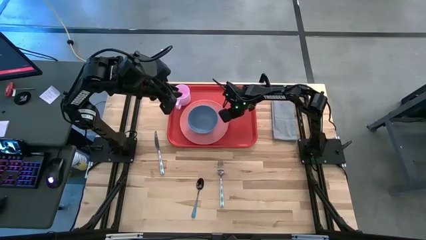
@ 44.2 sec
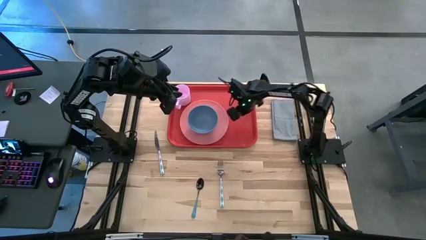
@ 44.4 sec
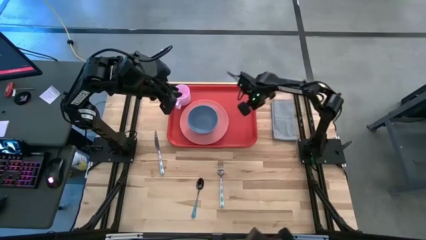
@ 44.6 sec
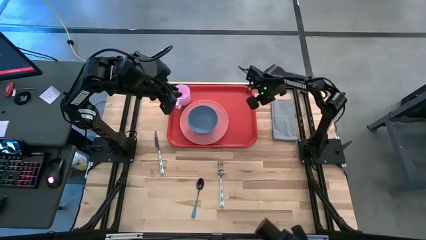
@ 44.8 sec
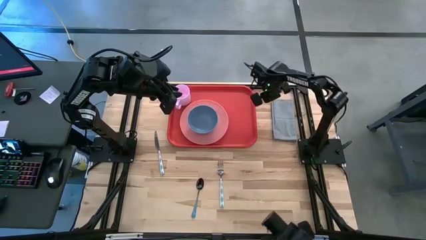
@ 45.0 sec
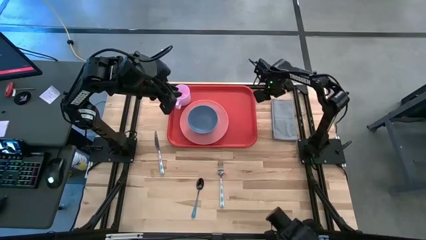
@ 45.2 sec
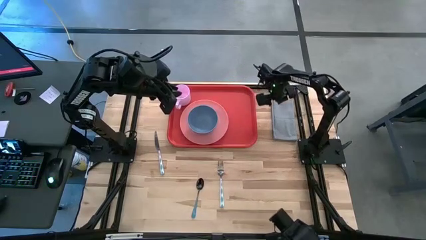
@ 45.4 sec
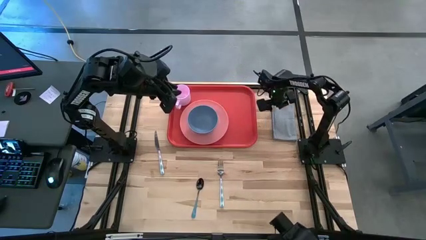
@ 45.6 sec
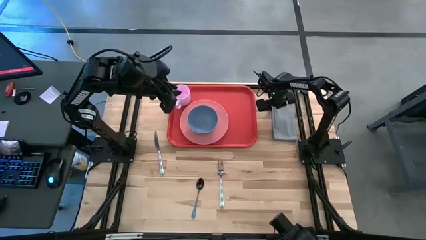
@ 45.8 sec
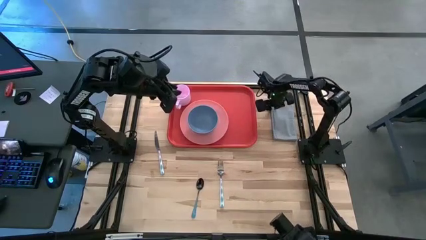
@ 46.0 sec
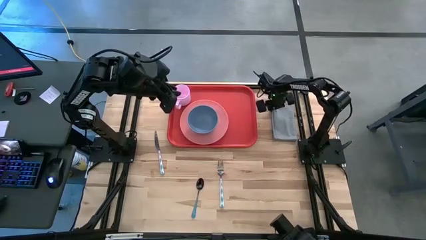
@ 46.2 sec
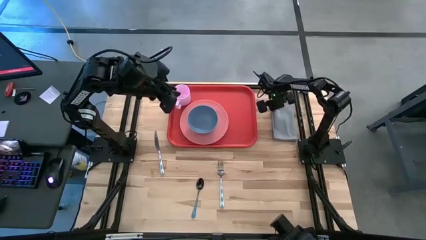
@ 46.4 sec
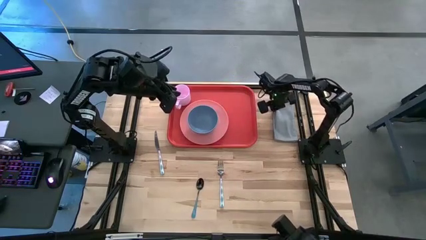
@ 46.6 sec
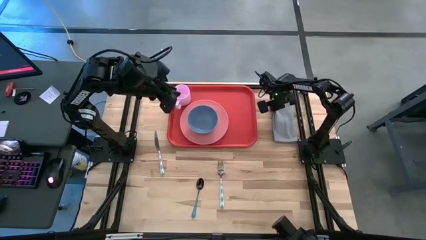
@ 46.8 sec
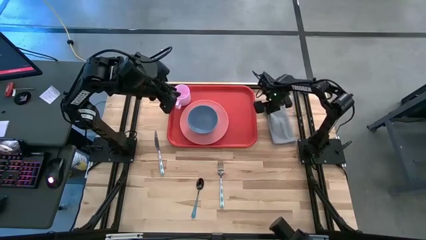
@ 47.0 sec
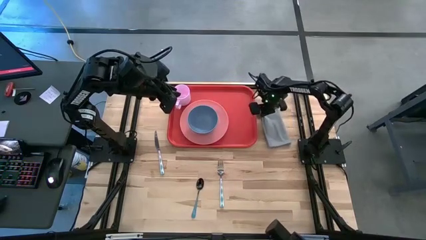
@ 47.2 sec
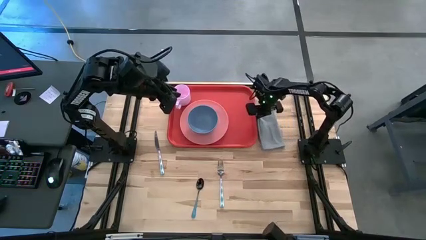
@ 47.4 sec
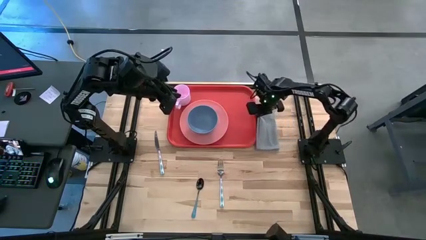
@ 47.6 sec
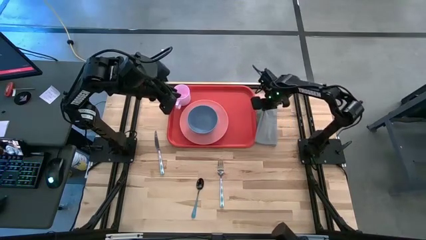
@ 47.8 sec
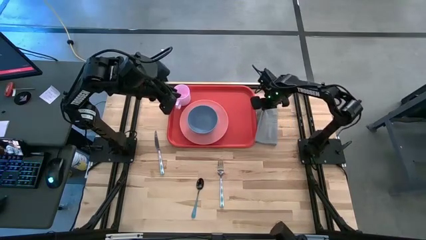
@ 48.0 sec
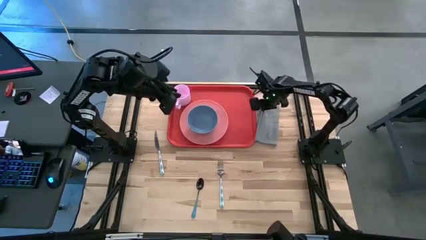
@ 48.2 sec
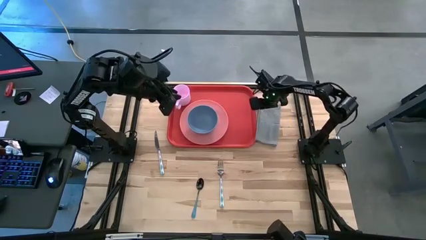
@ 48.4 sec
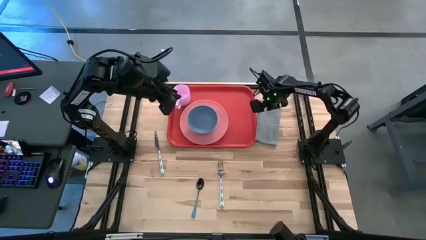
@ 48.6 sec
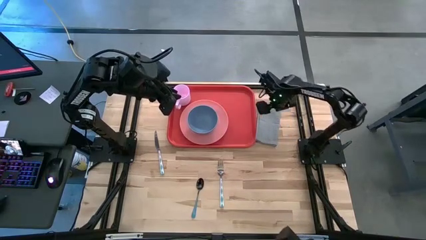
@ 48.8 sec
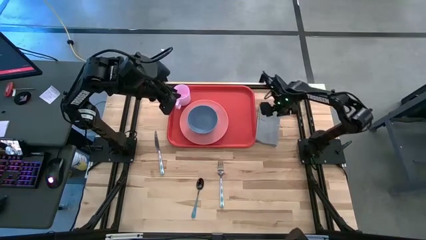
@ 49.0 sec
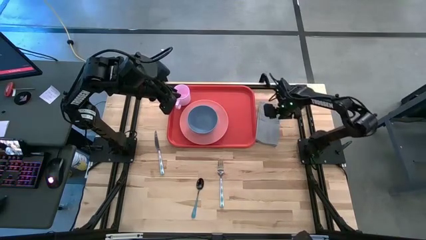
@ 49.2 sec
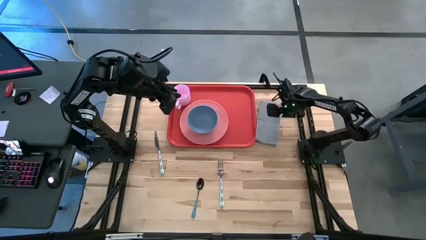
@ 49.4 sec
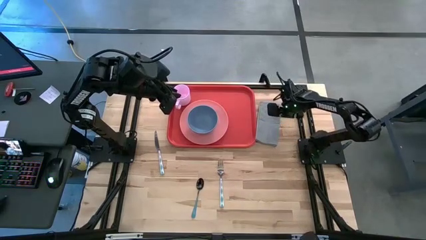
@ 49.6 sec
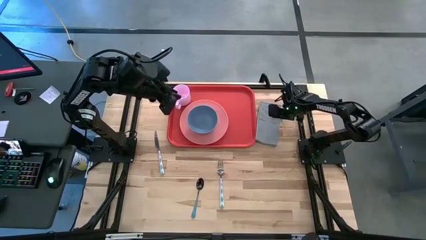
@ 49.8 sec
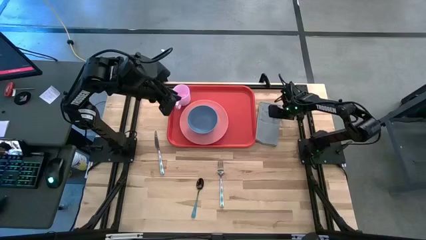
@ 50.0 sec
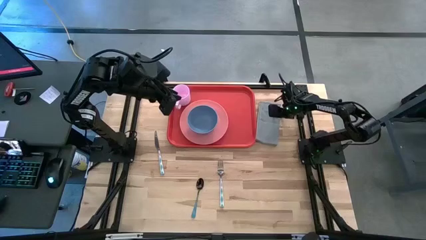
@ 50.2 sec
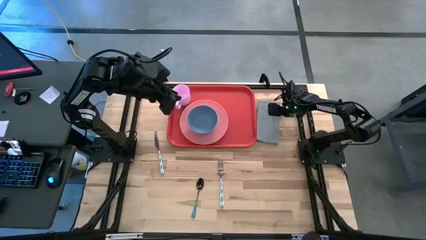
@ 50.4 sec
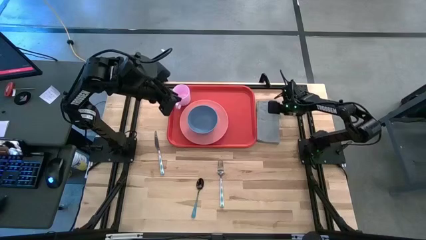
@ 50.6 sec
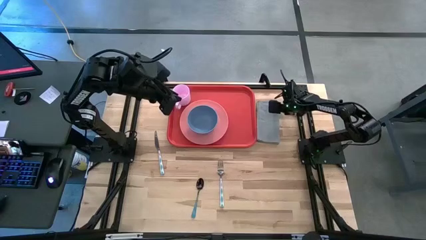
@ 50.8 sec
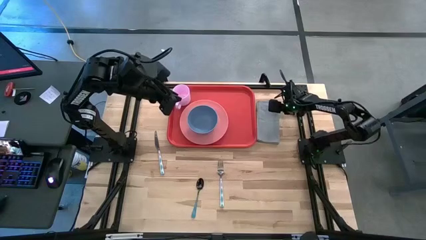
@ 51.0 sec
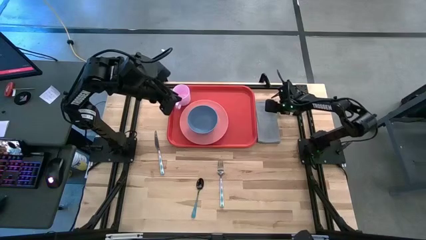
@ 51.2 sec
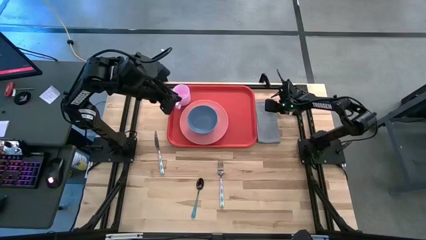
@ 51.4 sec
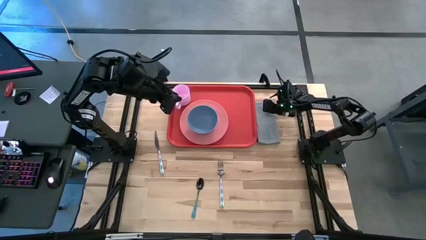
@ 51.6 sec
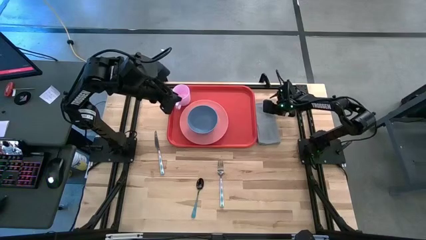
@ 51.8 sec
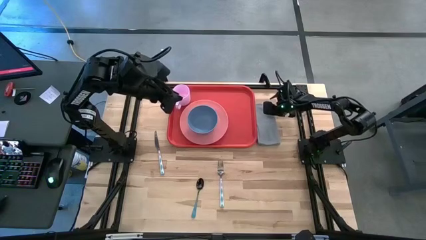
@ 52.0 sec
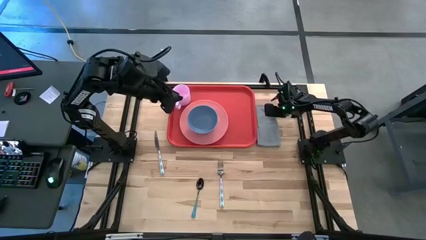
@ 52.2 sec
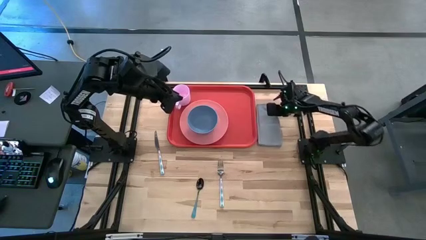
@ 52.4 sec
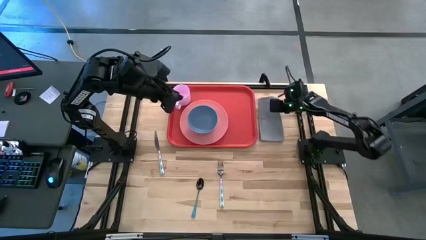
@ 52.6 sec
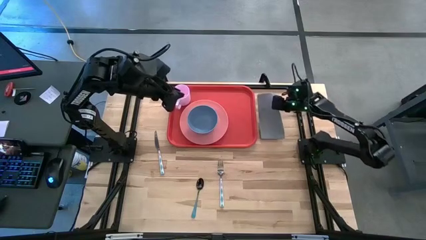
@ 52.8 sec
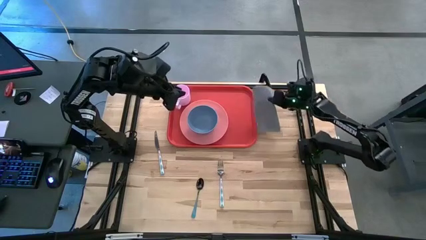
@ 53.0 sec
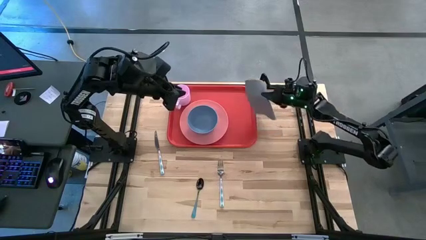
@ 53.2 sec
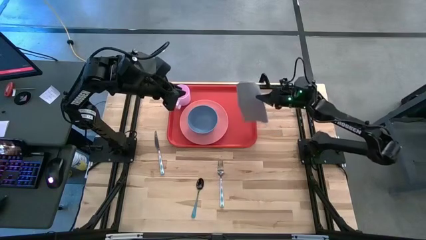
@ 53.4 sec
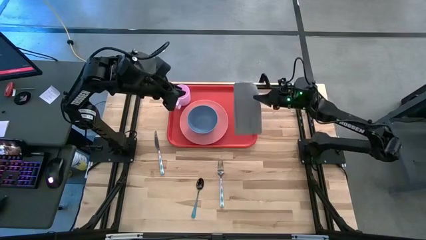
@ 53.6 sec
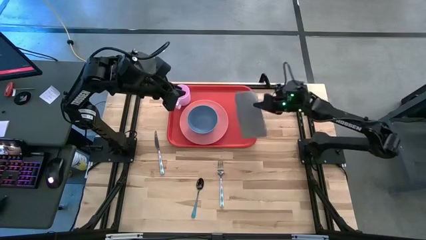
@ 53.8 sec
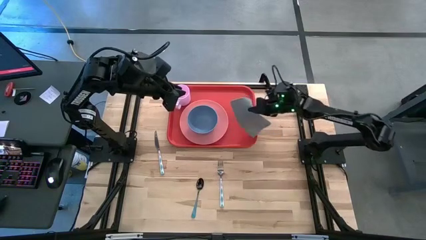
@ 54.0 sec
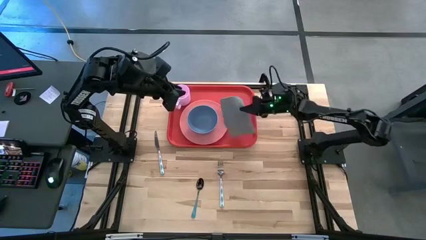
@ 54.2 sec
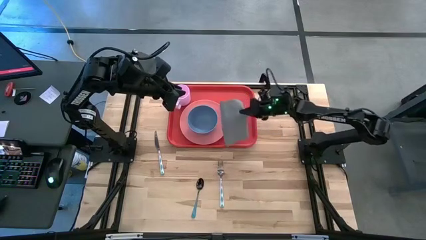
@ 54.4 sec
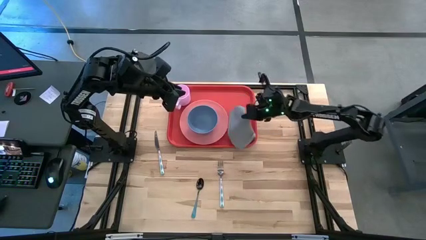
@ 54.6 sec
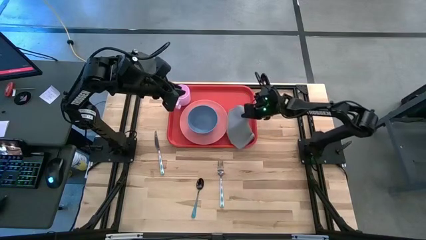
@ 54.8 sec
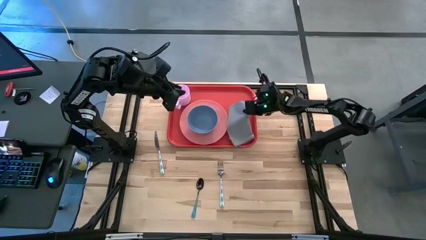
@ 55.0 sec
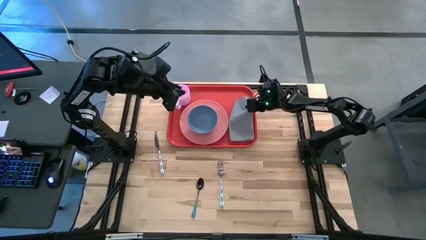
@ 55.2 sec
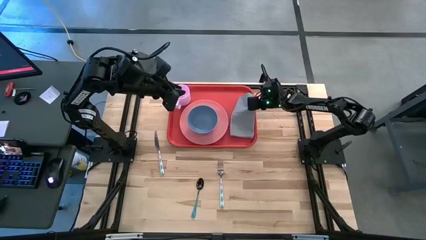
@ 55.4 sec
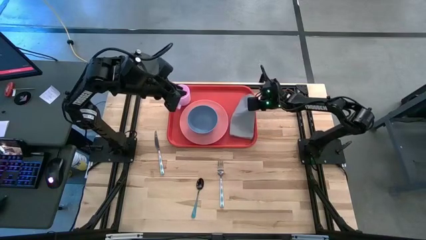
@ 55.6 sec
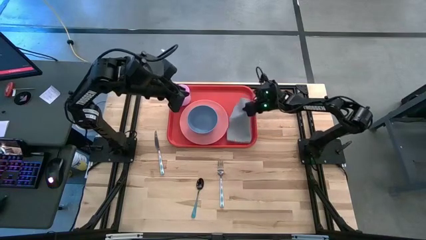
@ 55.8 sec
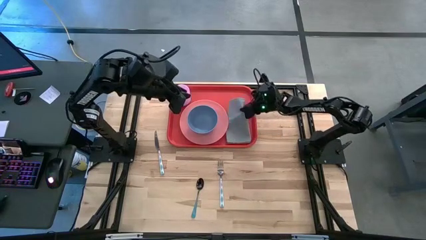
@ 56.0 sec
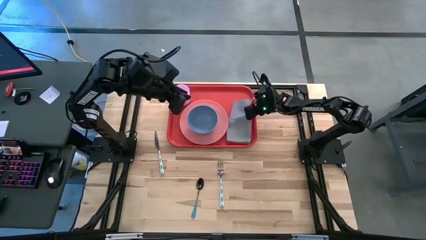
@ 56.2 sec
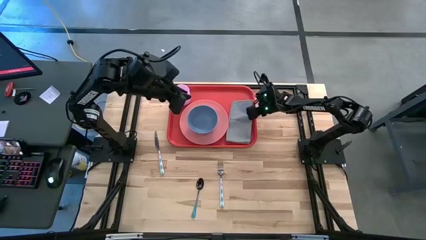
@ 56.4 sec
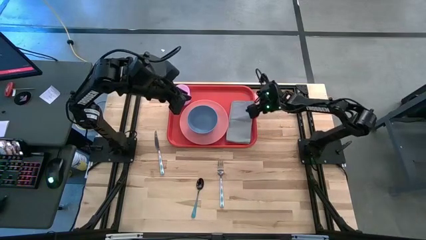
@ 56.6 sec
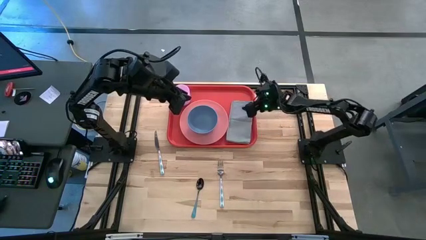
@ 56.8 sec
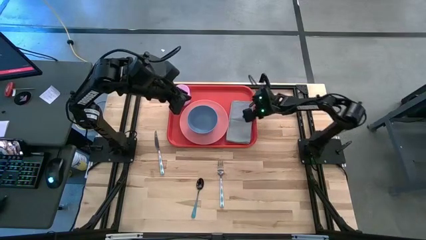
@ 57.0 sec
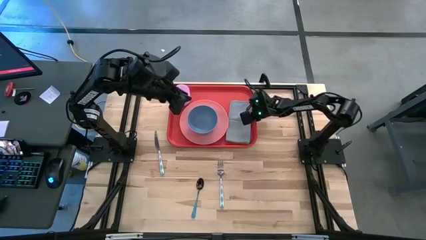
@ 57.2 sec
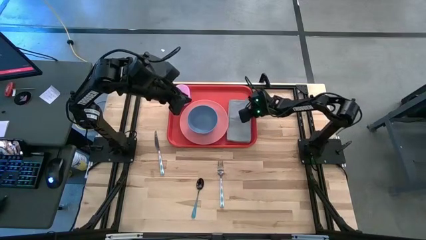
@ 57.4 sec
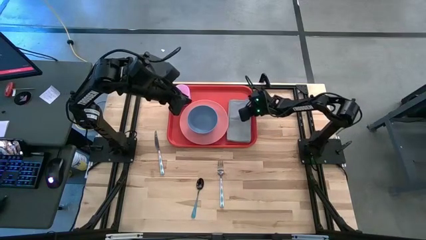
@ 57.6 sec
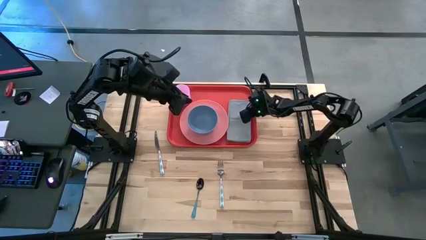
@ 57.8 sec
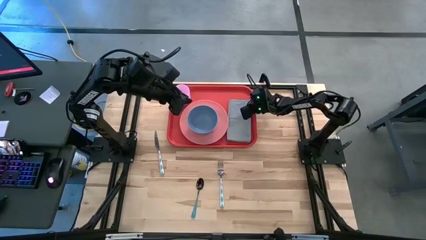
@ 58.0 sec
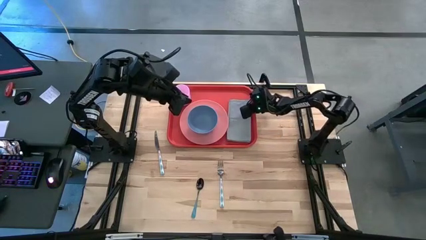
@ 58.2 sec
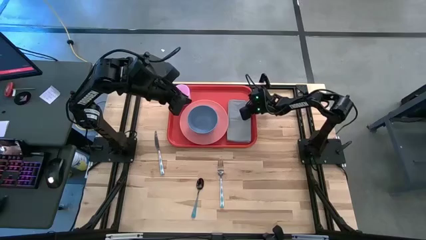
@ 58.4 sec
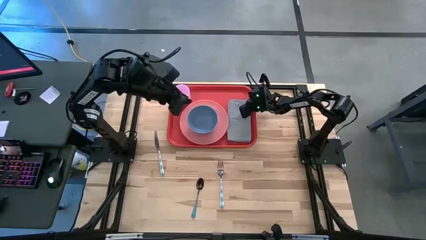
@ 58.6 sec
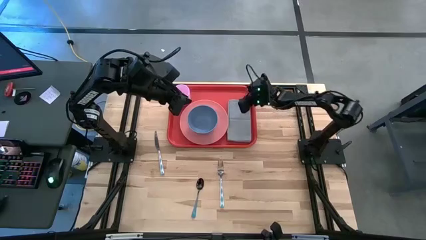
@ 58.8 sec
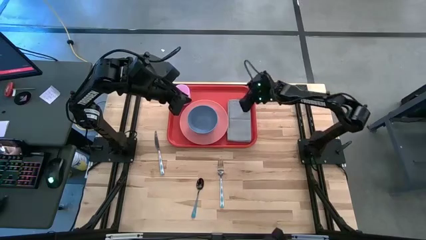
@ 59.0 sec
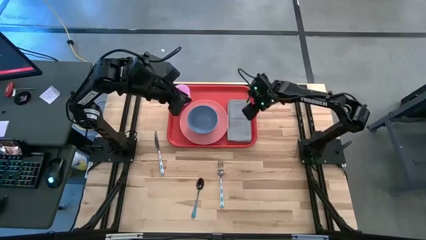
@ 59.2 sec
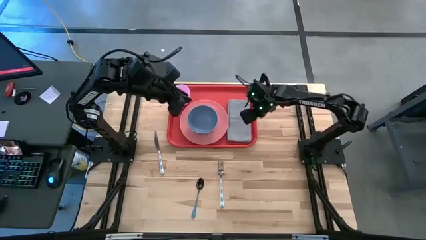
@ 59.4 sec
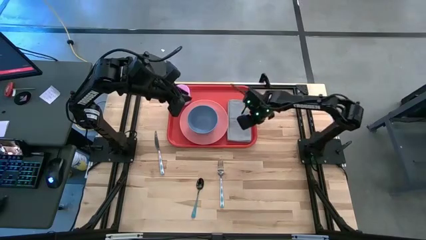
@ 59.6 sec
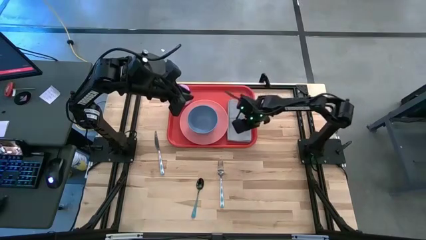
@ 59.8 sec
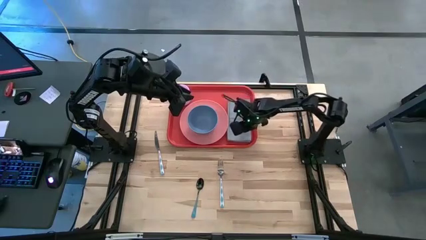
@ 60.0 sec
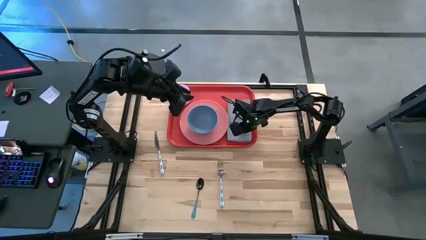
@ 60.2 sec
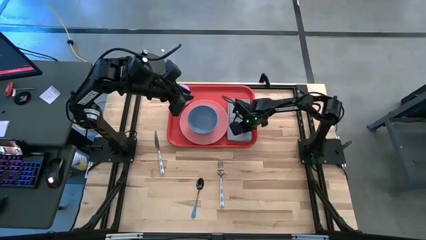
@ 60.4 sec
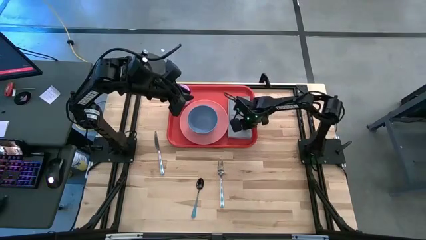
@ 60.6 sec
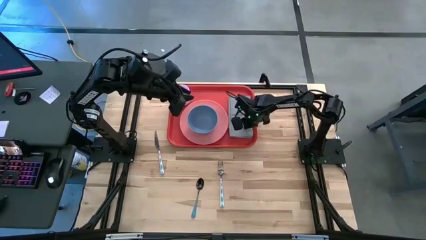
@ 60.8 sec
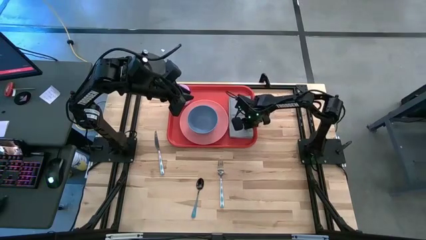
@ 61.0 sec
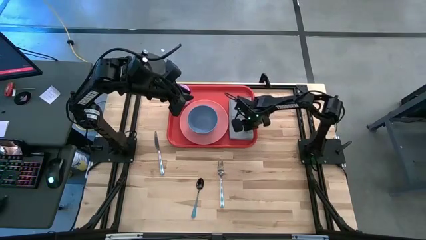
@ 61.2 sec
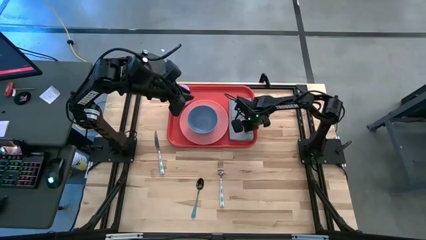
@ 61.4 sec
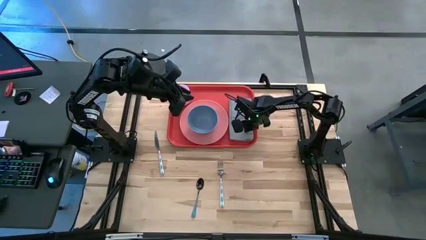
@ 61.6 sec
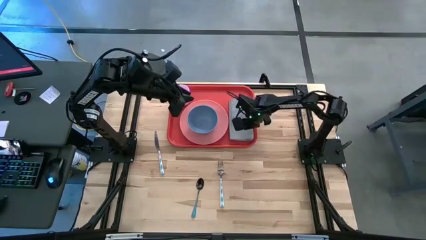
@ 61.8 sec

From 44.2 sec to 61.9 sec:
Task: Set up tray
Put the gray napkin on the red serving tray
